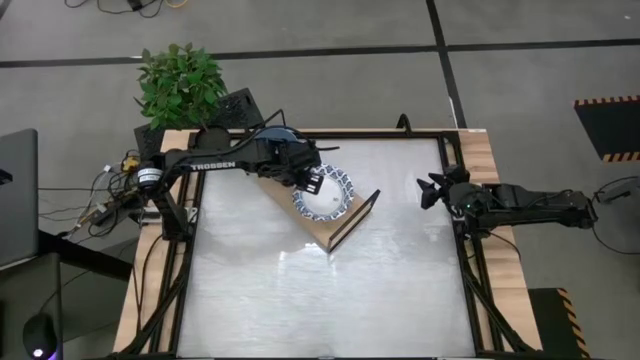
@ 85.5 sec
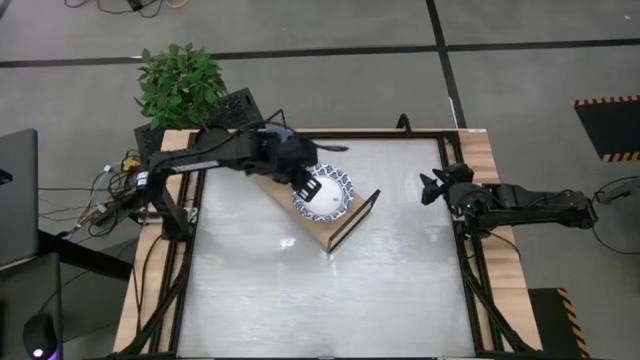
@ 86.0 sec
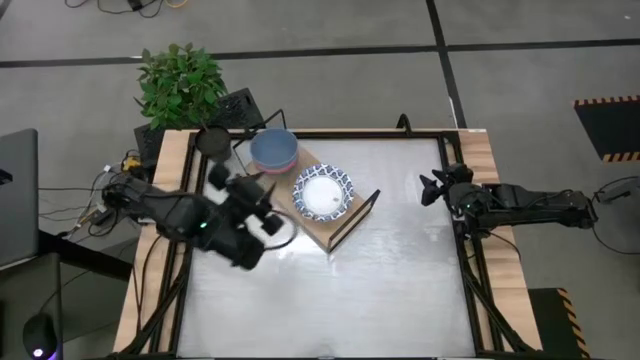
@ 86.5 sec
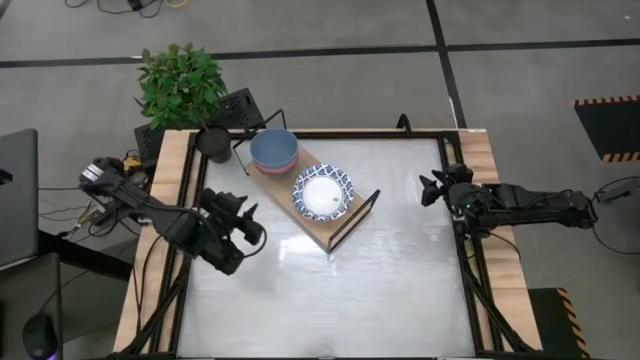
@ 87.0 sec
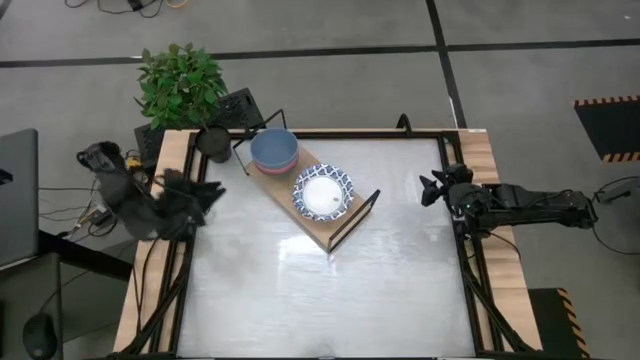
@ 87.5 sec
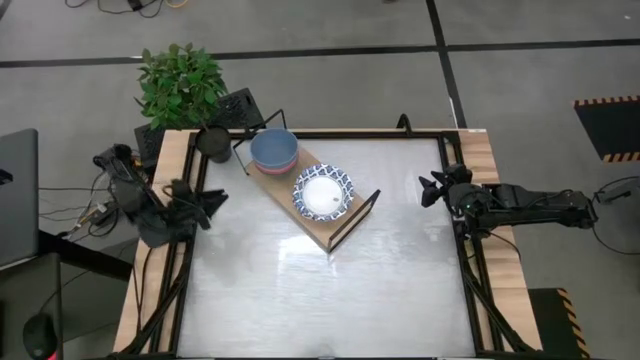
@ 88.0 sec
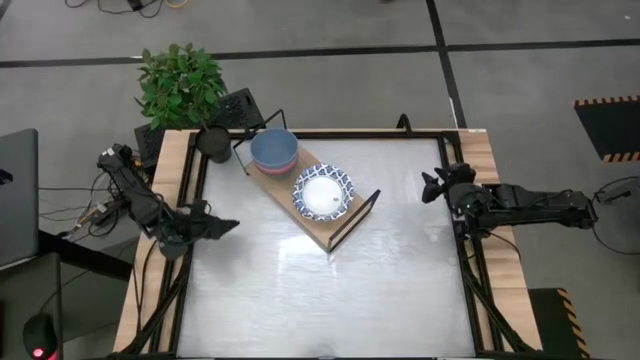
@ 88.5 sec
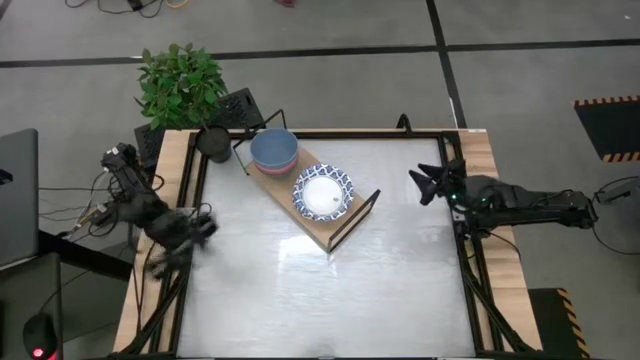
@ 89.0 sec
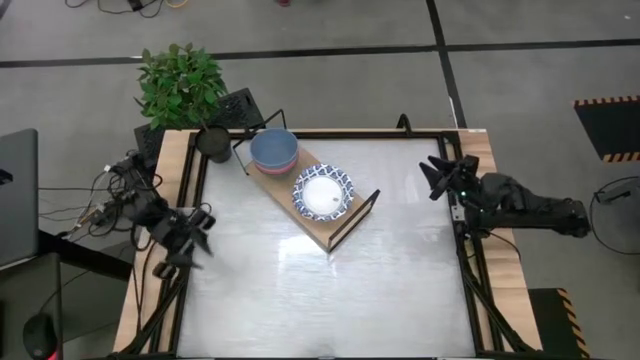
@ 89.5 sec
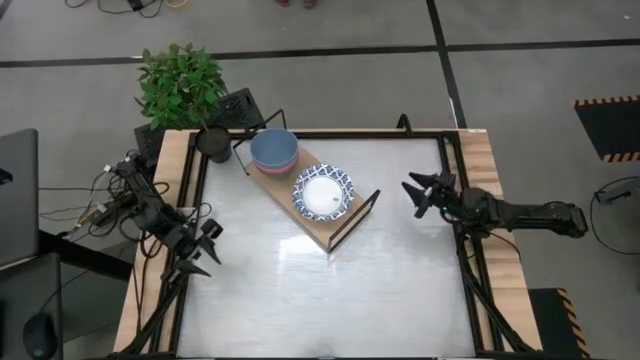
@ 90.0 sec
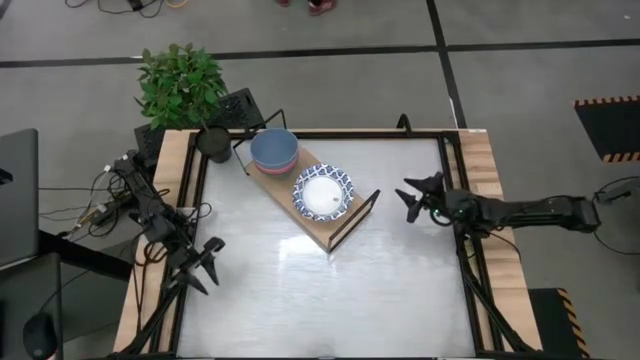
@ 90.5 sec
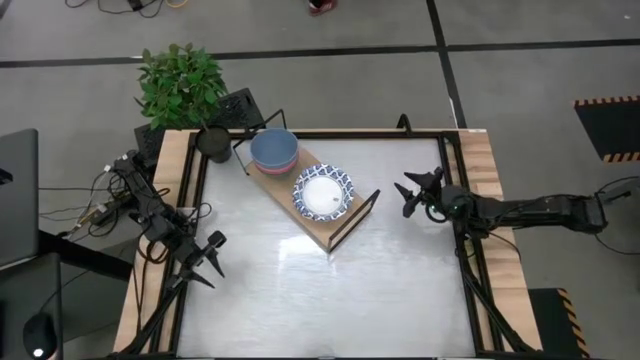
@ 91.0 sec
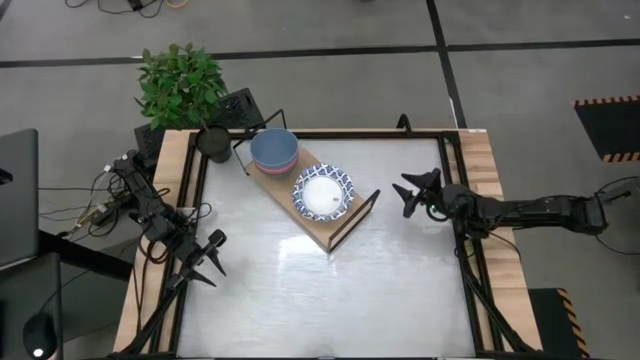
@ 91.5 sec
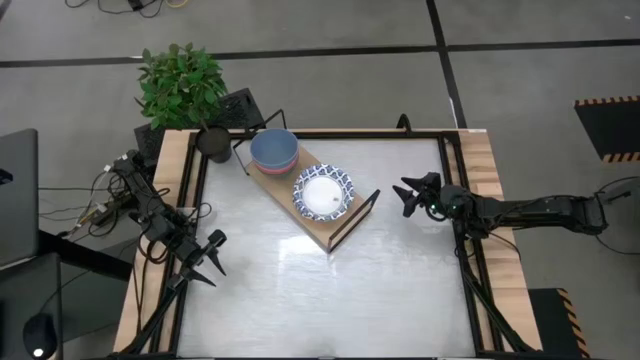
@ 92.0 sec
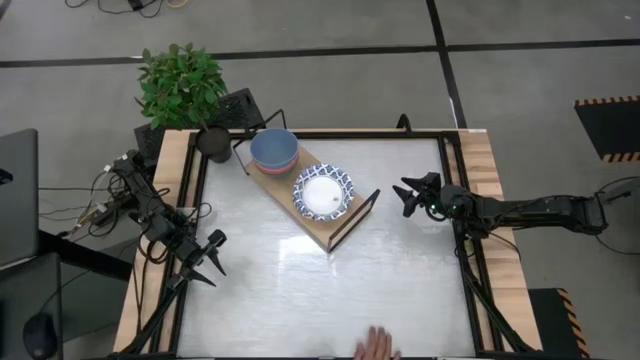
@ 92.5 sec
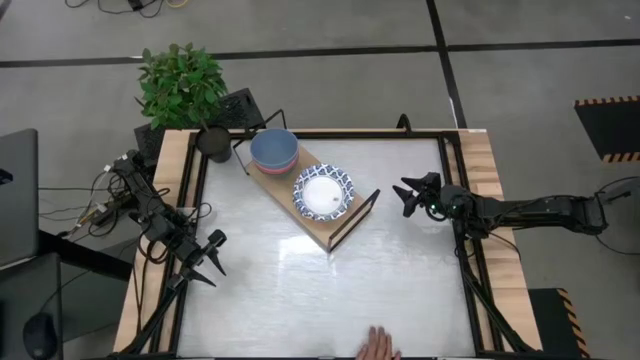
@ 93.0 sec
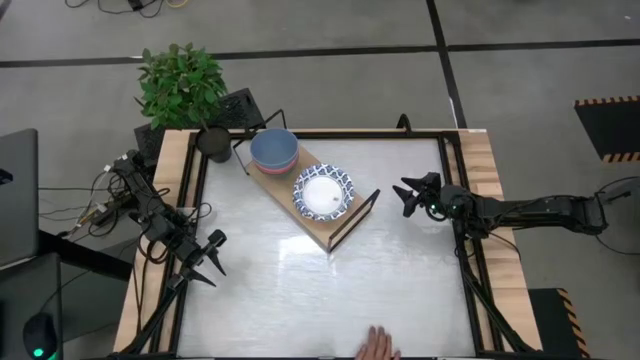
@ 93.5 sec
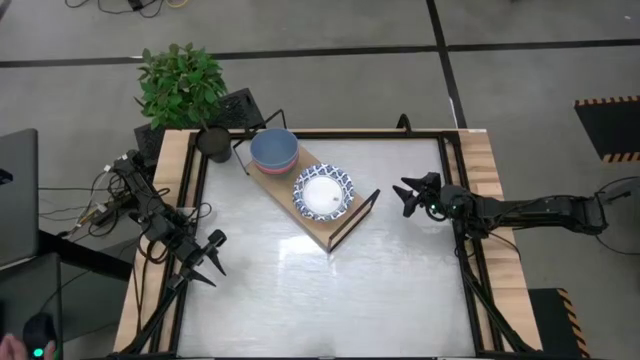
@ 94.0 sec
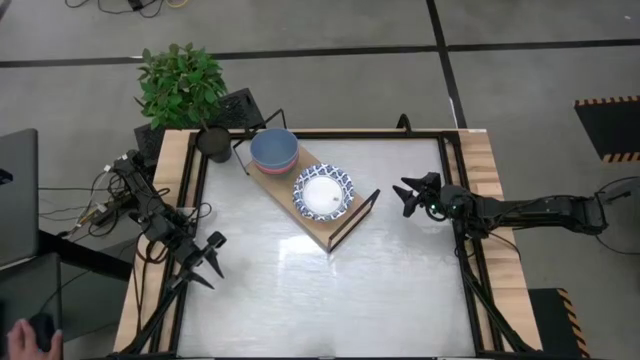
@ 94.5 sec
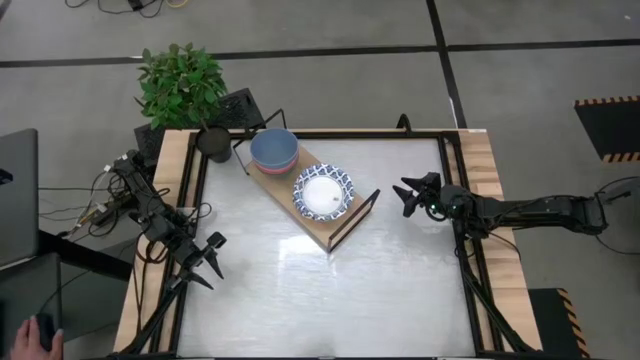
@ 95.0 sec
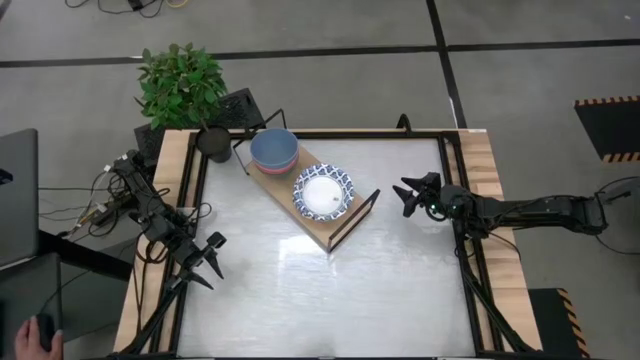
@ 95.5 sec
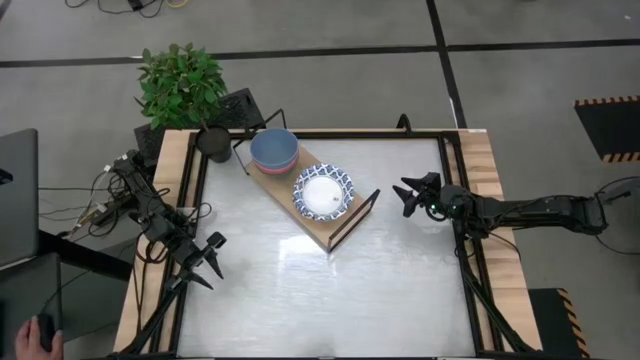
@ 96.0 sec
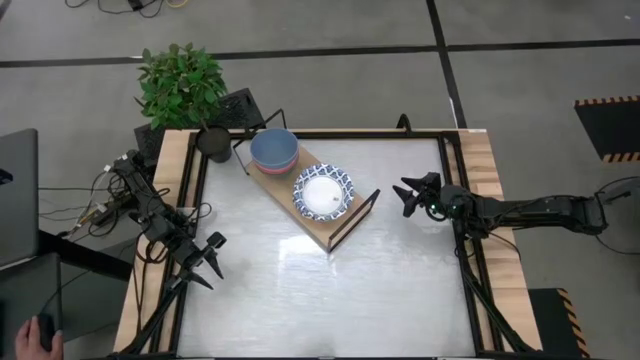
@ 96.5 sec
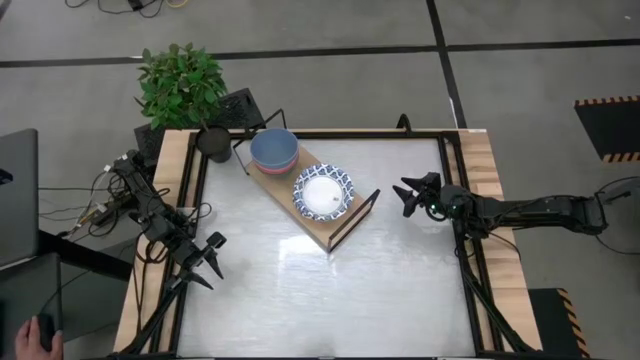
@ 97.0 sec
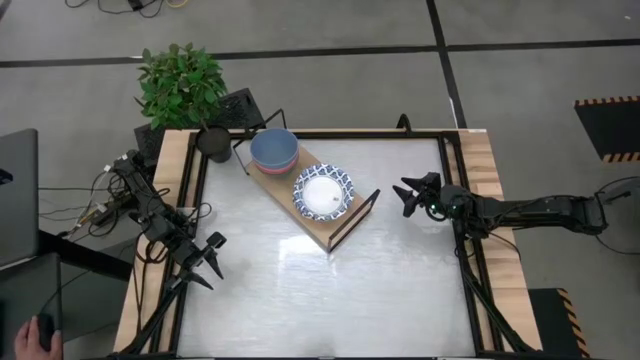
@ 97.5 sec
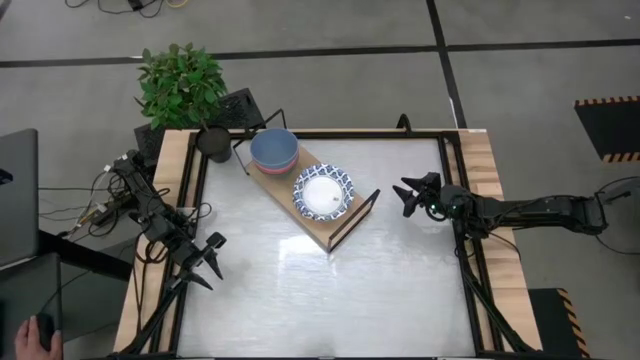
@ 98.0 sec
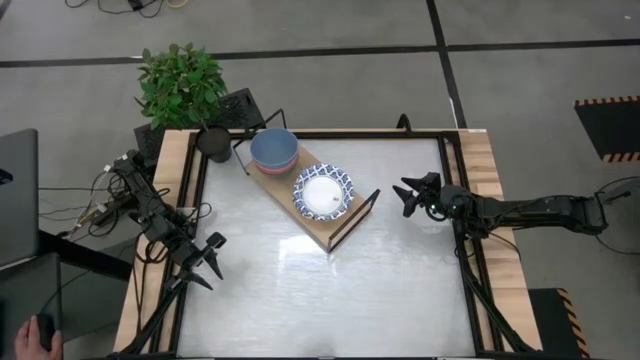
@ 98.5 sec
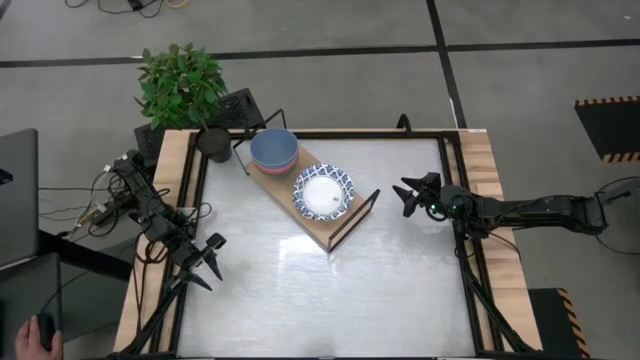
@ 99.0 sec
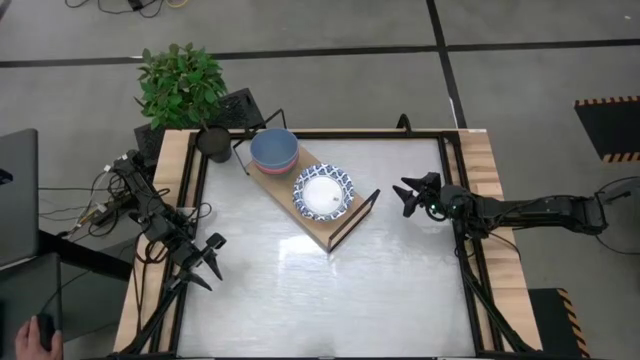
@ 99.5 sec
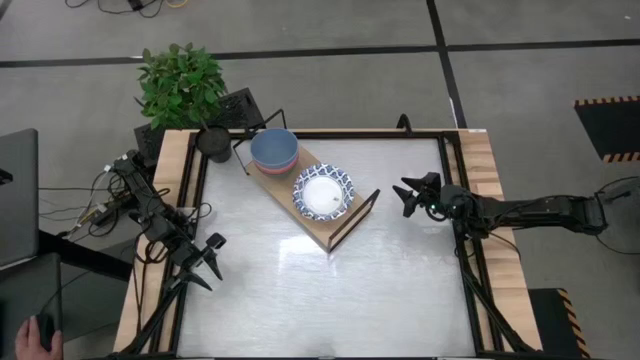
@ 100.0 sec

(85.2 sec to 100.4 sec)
Task: Place and stack bowls onto a shelf
Return to home position

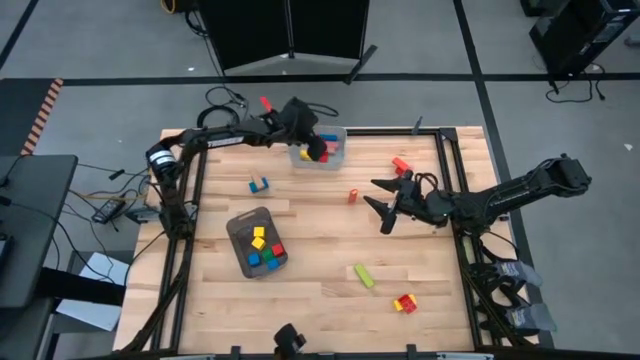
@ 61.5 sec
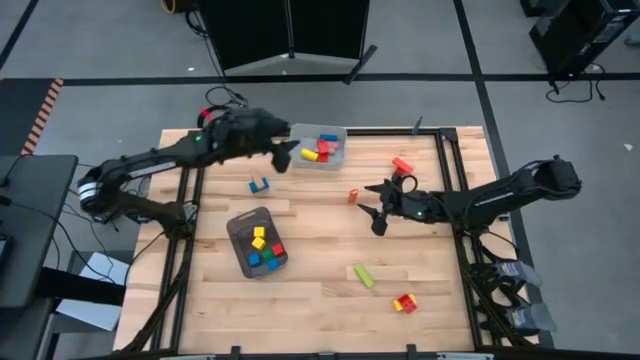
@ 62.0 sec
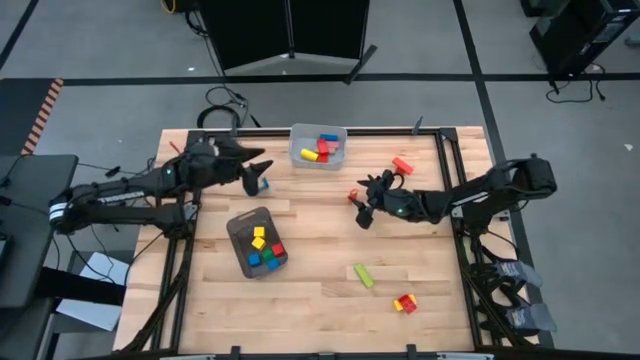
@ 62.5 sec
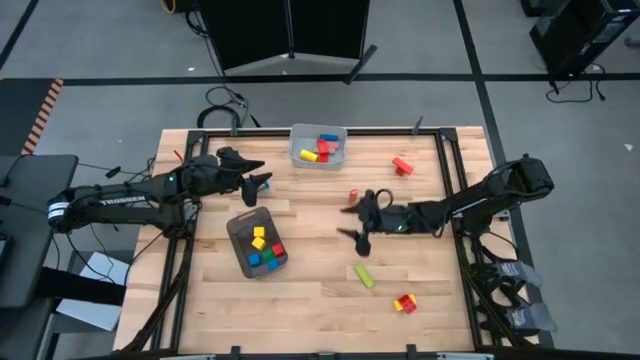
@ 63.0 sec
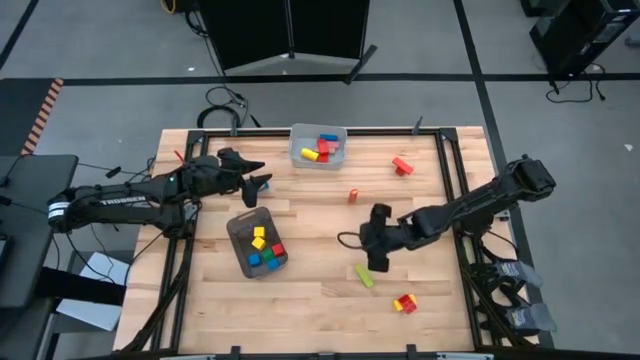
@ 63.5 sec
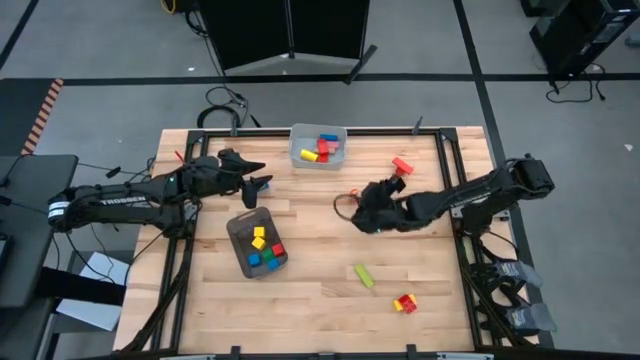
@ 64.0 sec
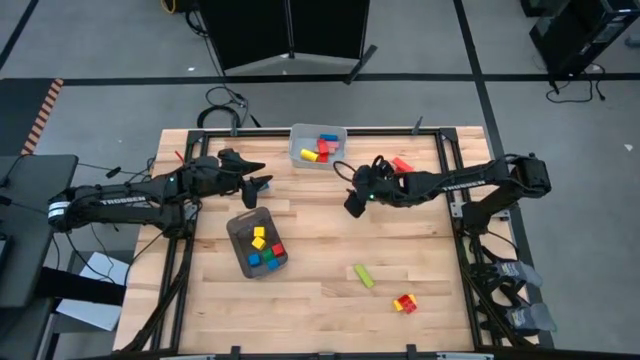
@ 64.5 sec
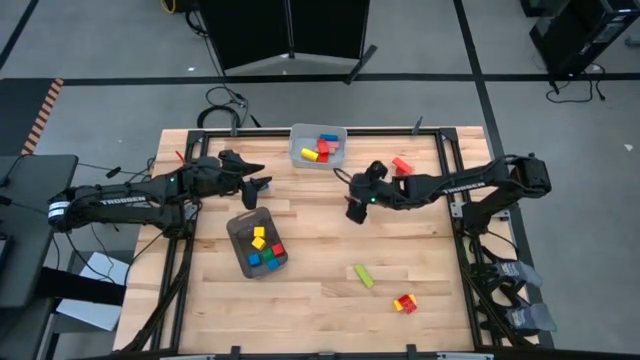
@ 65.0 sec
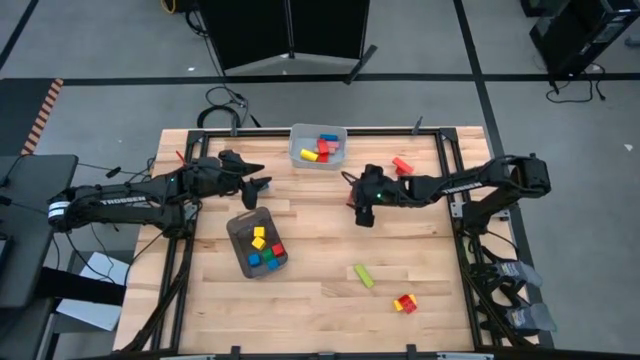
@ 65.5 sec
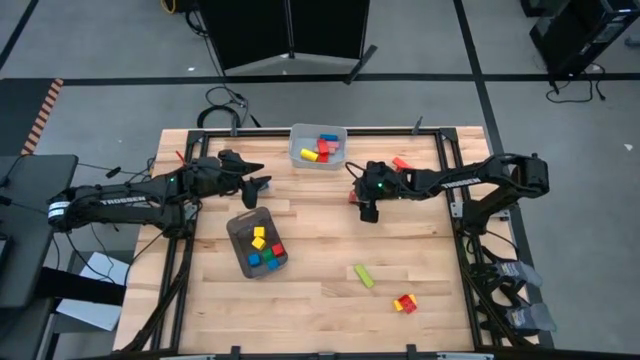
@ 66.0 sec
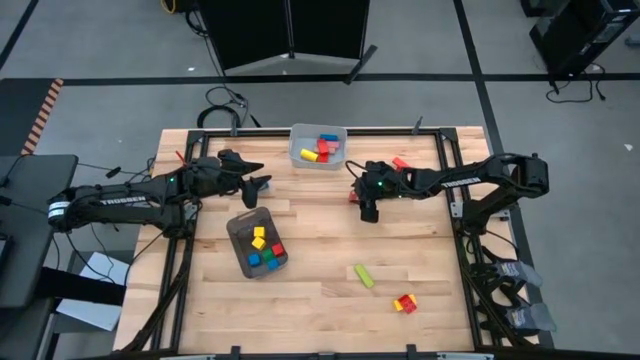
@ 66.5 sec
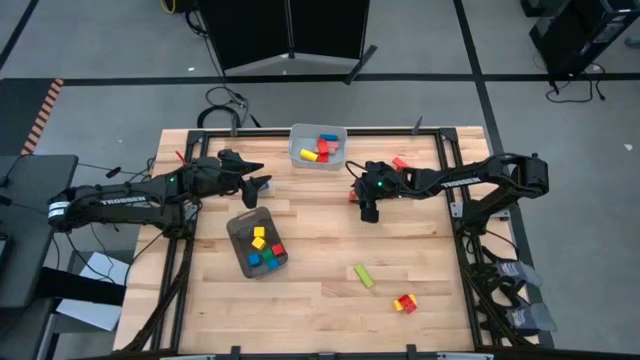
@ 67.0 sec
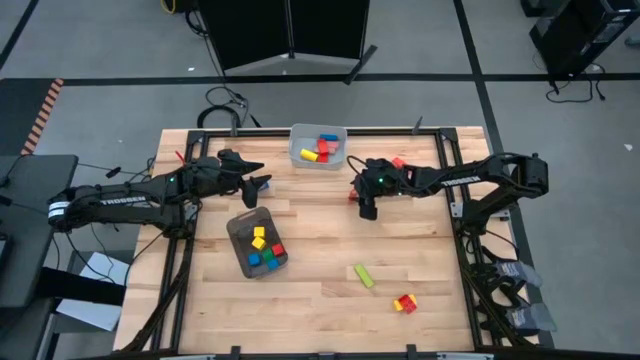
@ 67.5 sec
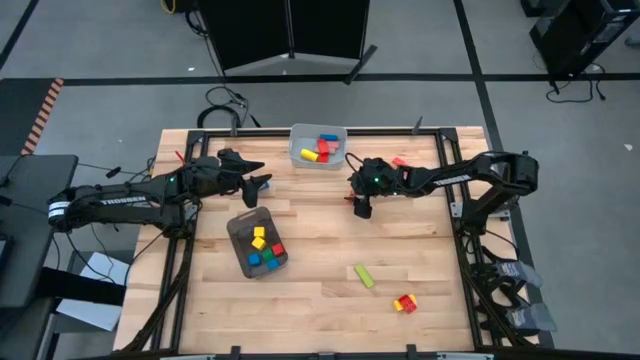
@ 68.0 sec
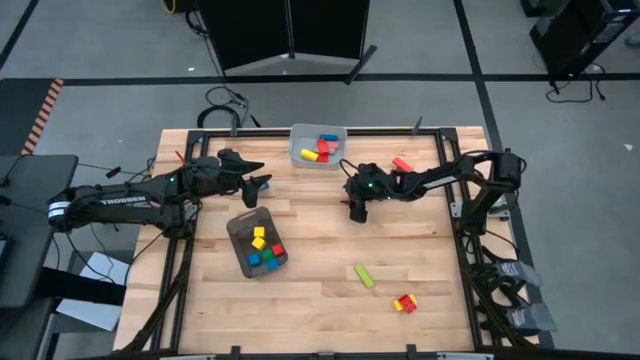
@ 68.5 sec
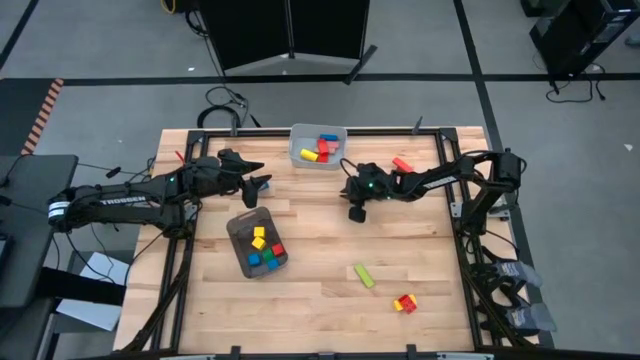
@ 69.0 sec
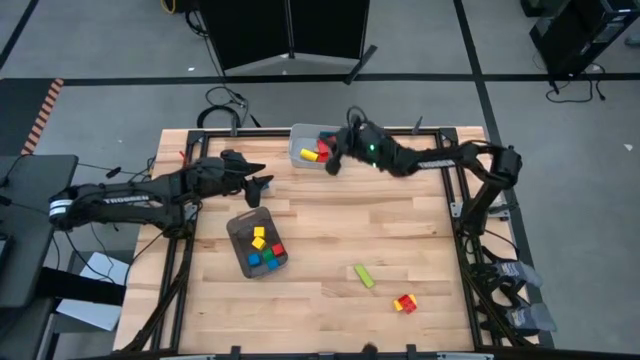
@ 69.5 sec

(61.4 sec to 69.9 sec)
Task: Sort blocks by size
Put the orange rectangular block into the gray bin
